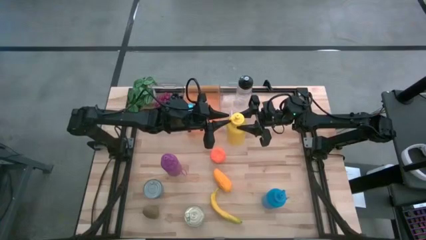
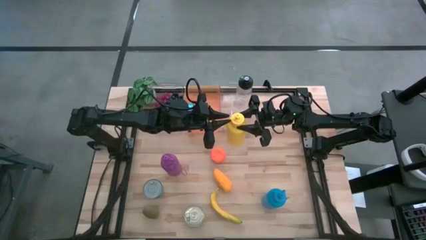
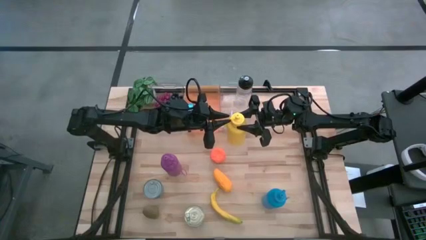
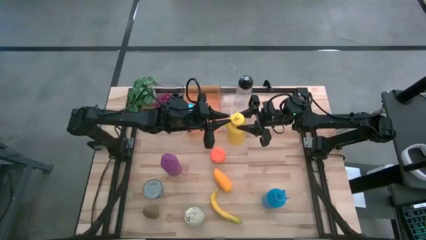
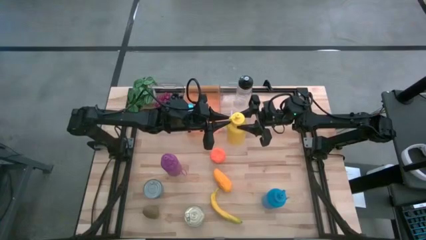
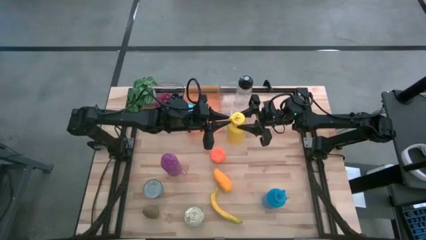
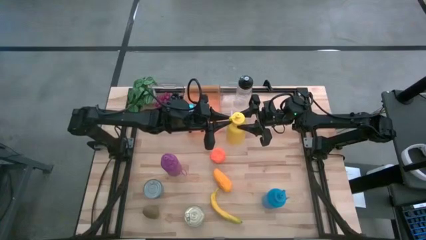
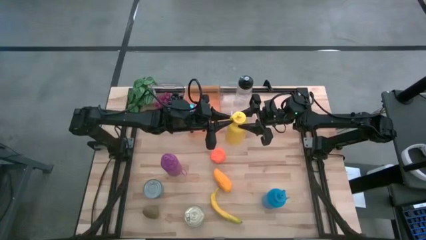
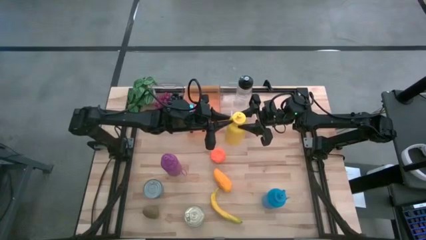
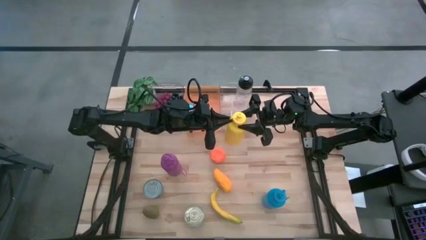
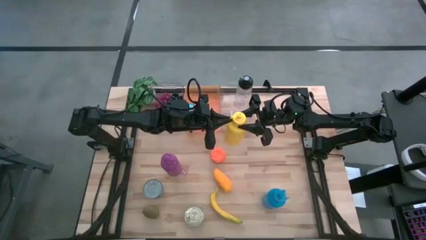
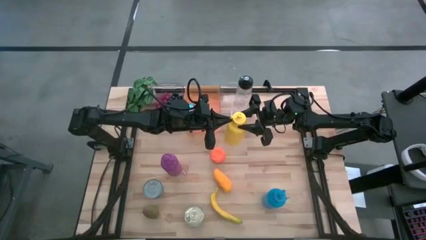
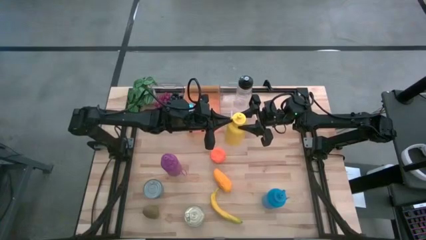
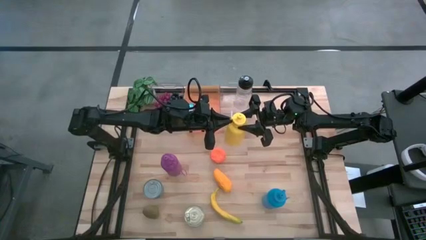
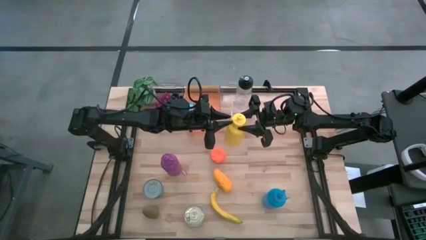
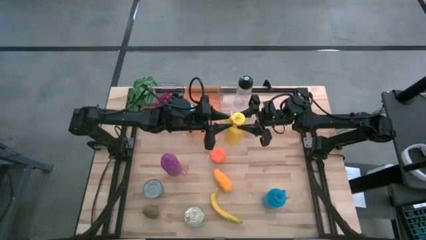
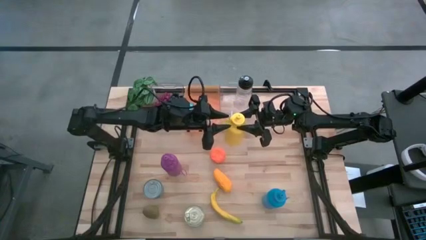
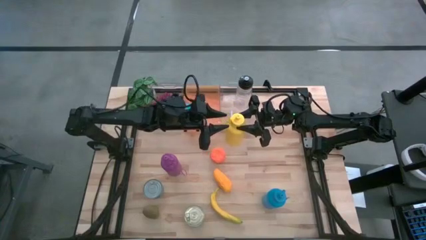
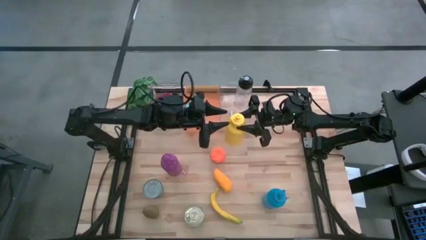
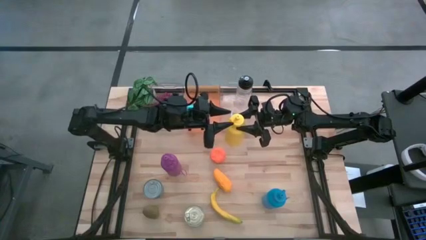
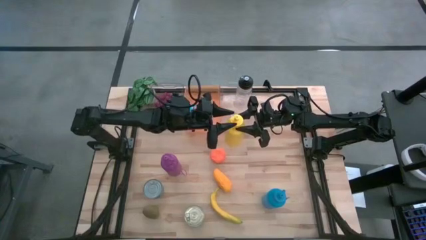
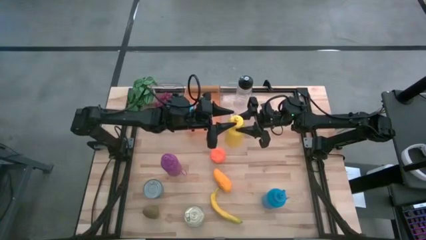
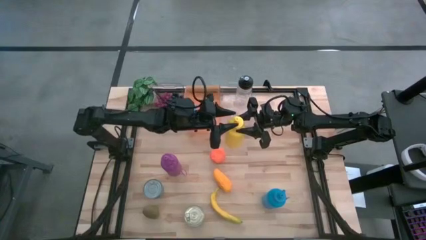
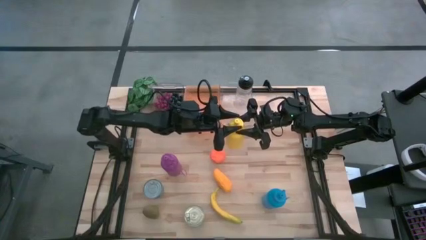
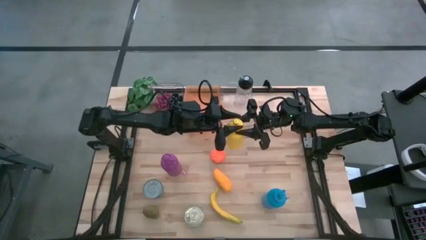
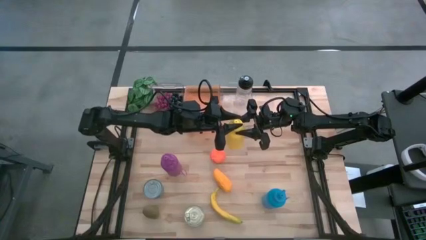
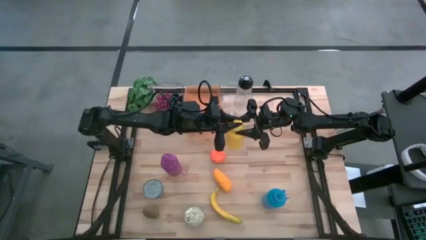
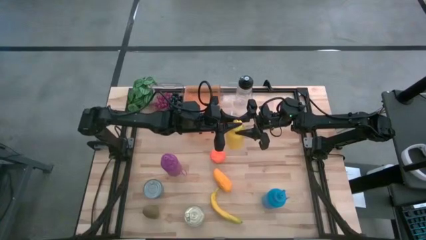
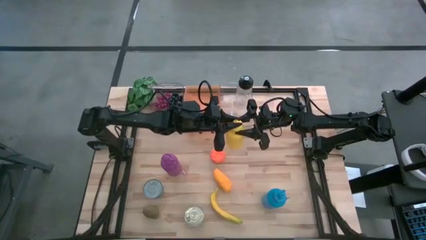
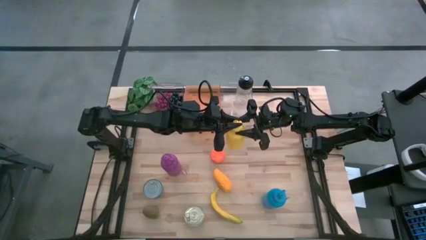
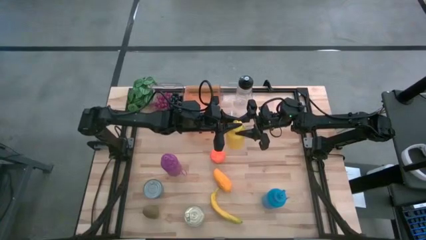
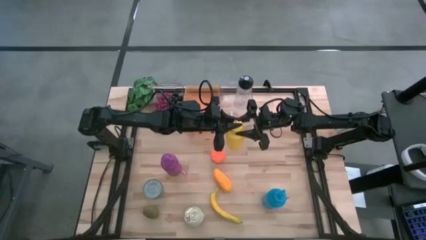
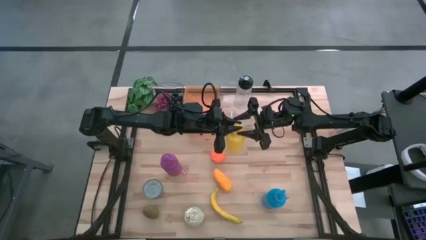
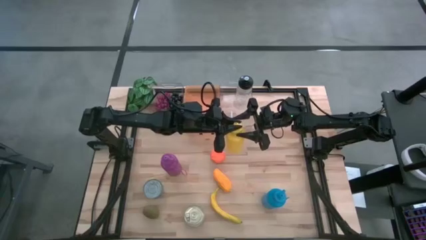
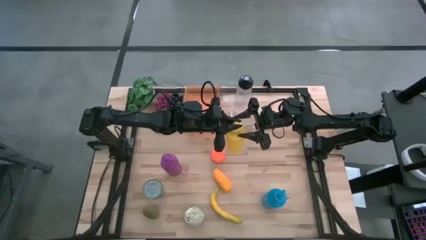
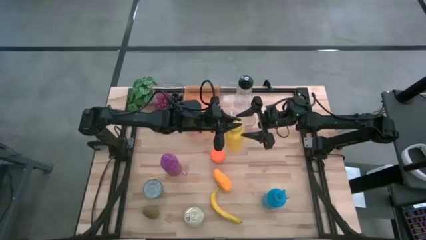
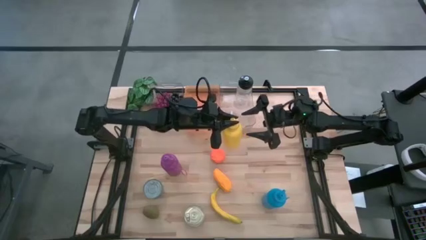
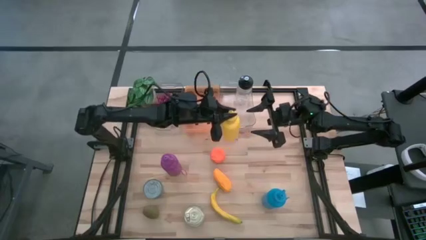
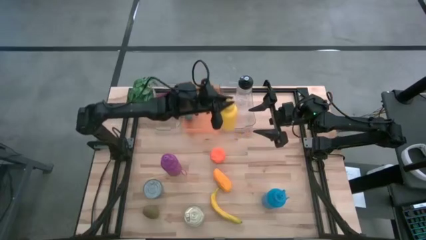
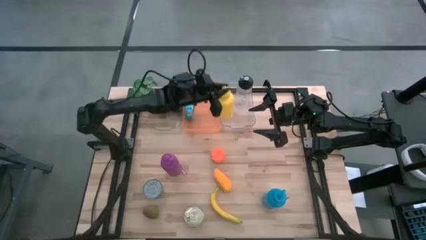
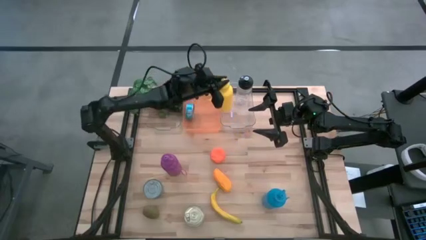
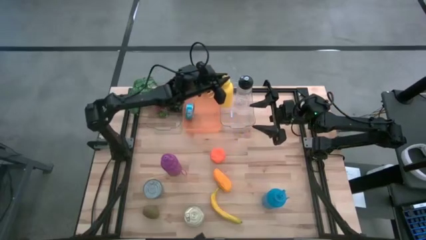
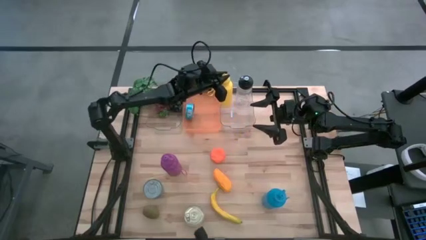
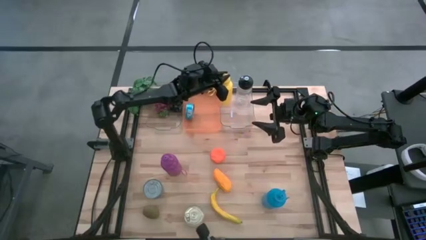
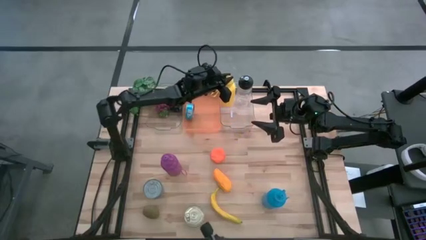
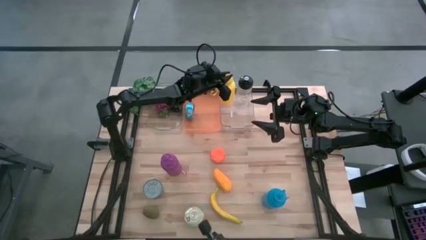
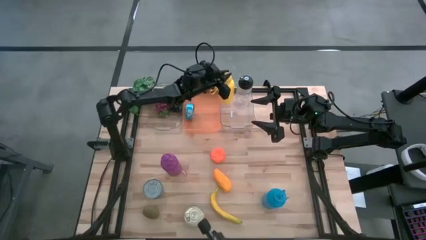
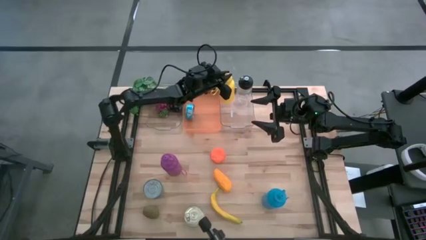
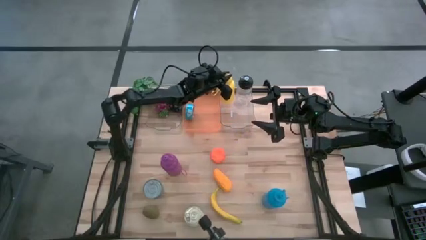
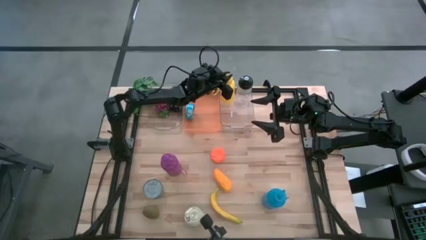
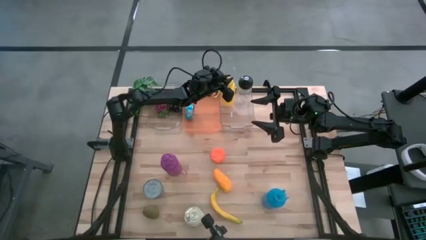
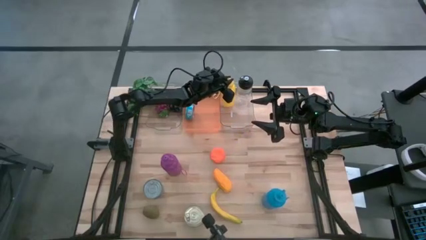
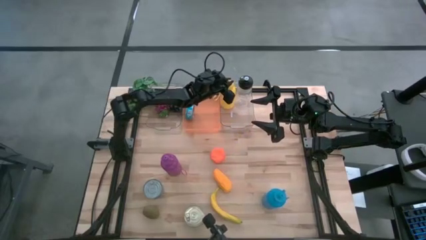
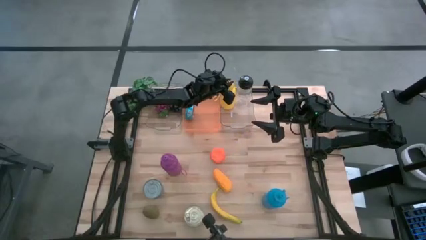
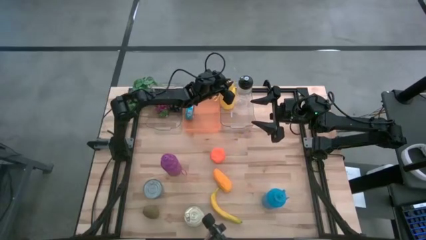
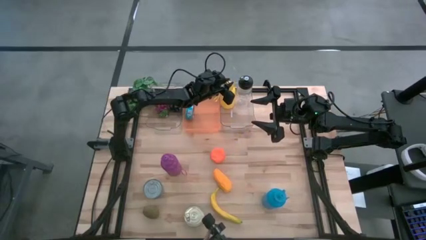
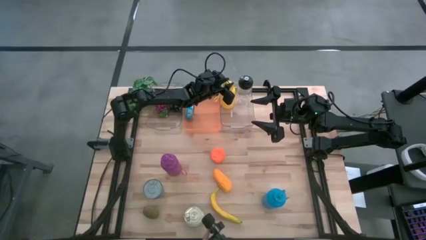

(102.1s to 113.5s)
Task: Pick & Place Food Item
Put the yellow water bottle into the right transparent bin

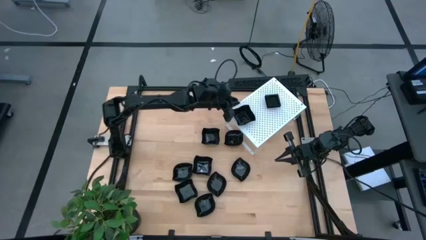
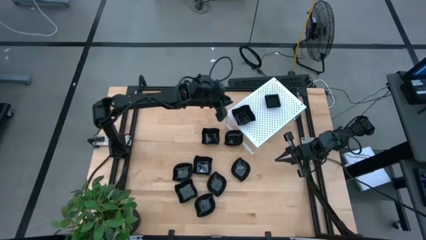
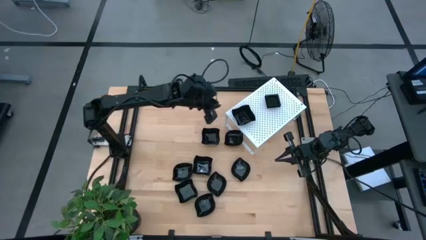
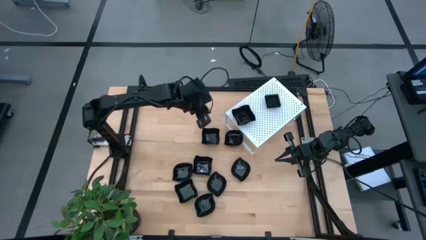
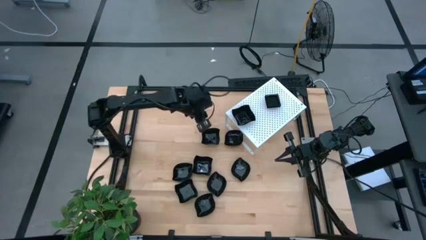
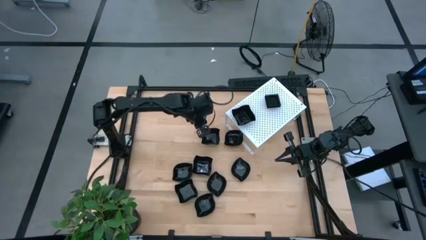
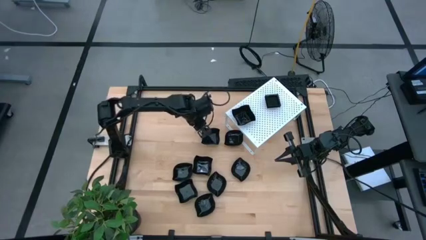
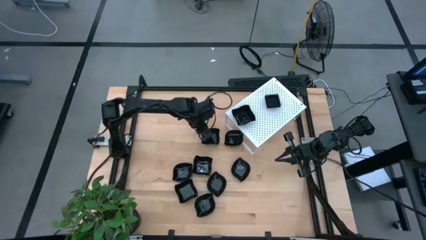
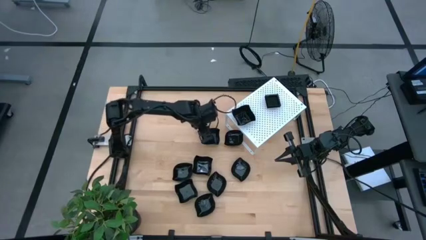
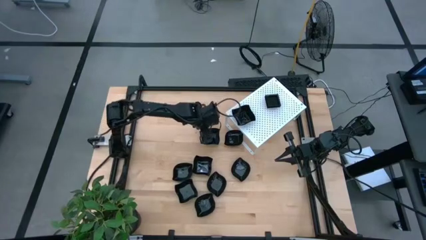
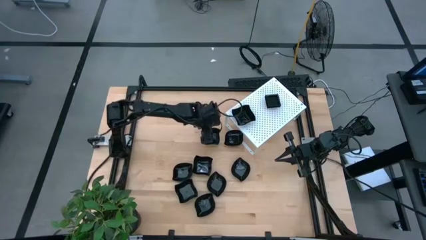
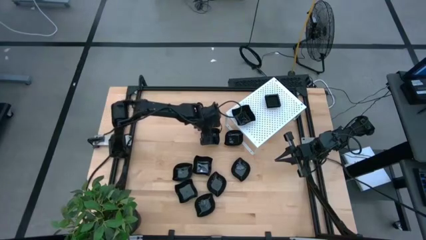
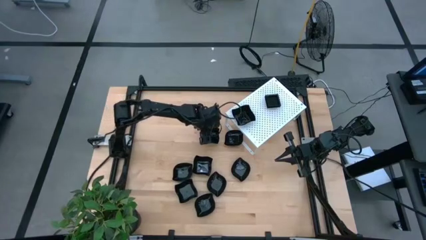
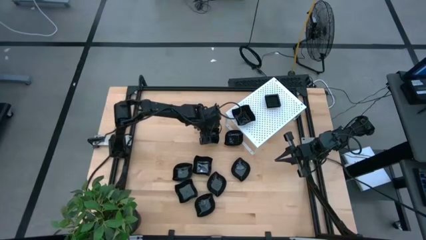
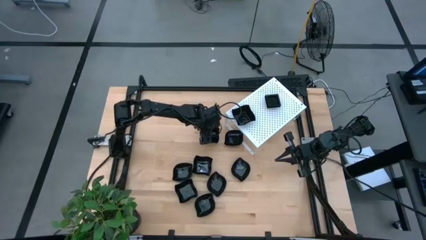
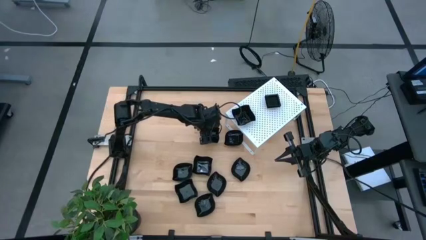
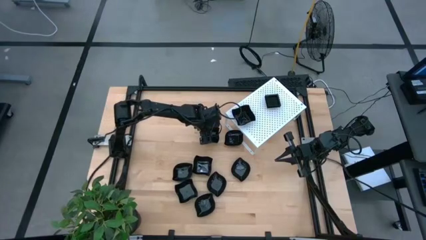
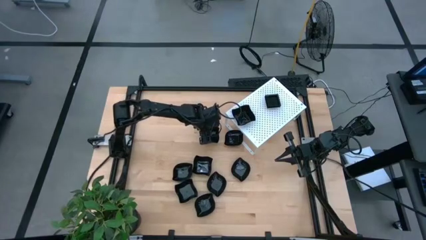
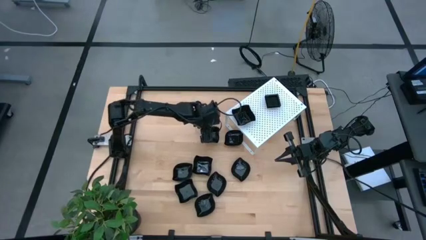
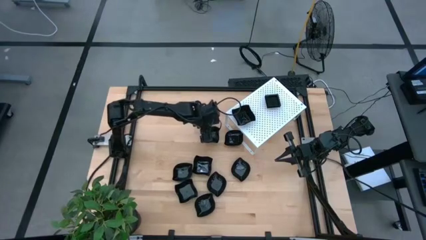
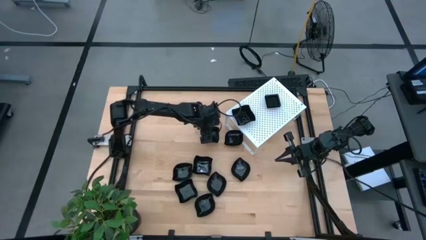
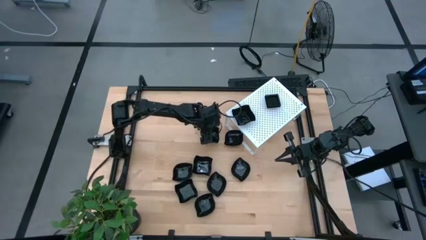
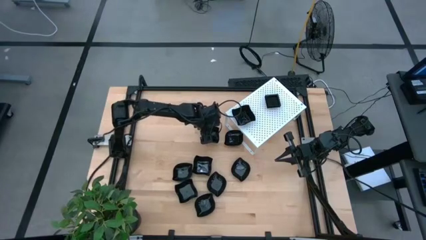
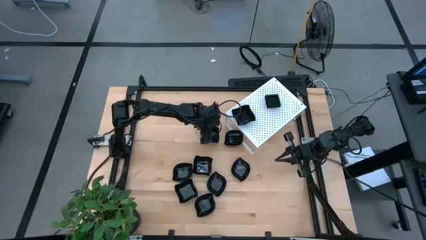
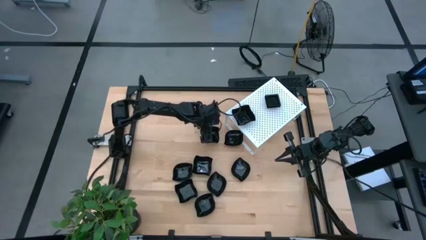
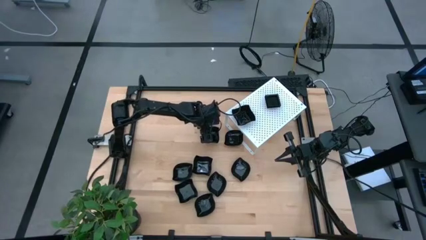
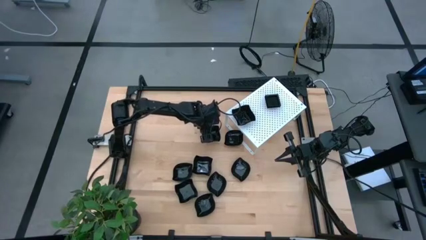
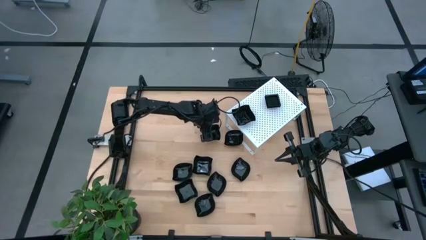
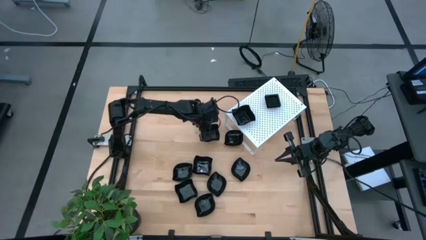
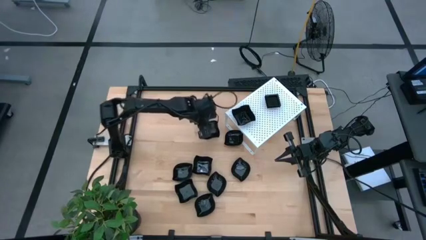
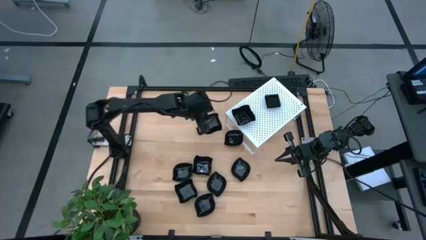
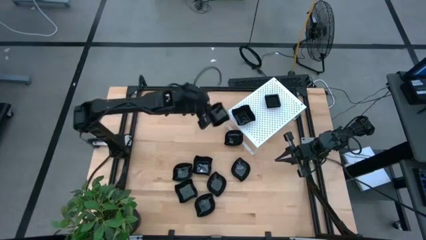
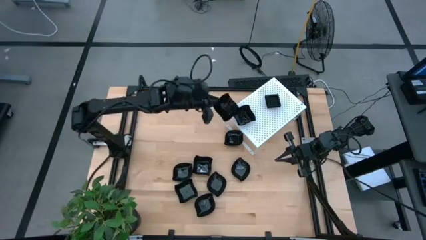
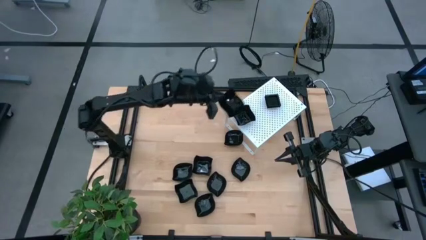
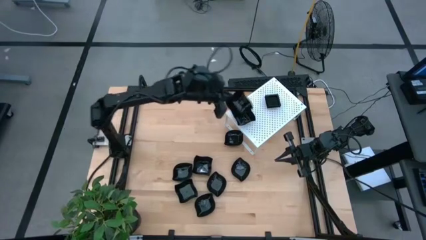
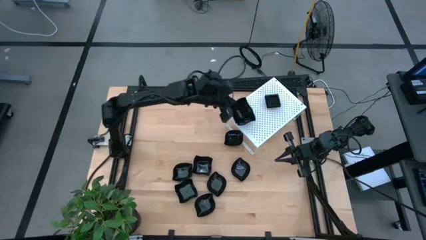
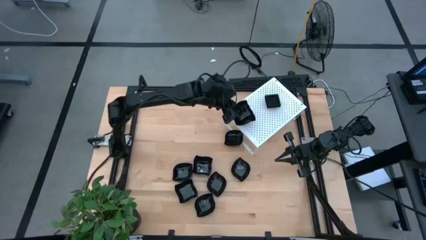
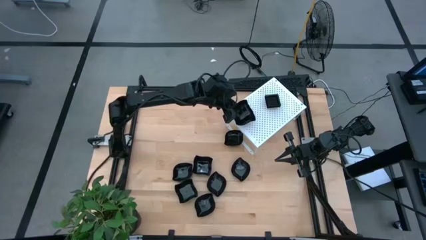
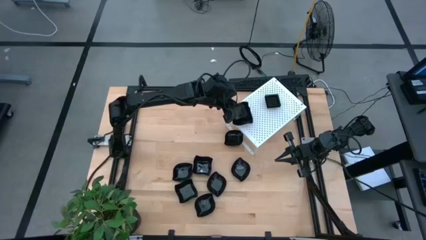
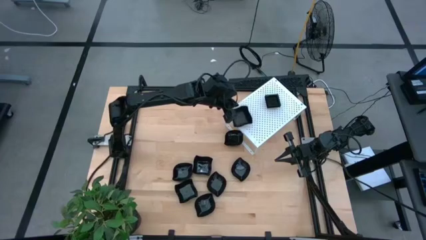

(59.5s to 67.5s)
Task: Pick & Place Mini shaped plates
Stack the black distorted square plate on top of the black distorted square plate on the shelf
